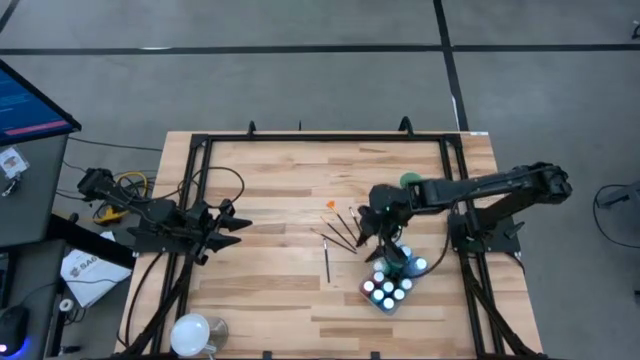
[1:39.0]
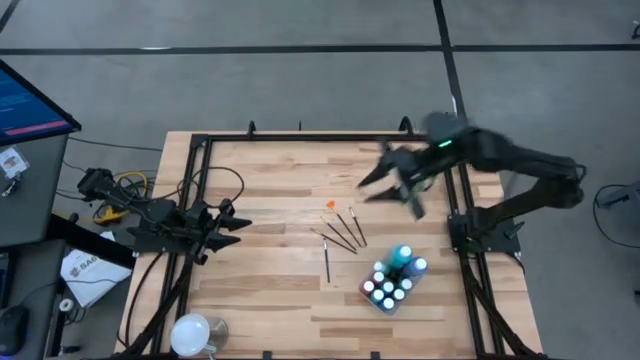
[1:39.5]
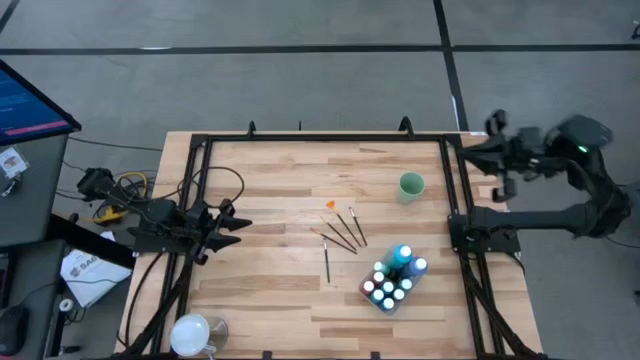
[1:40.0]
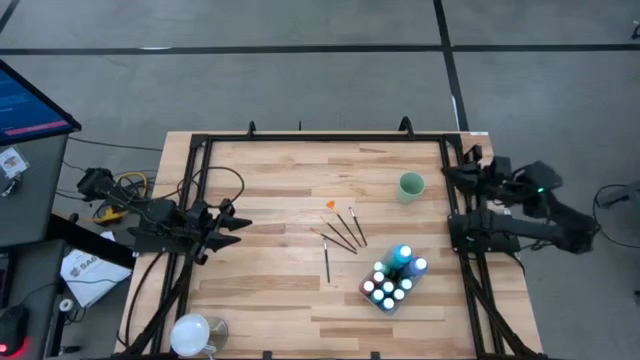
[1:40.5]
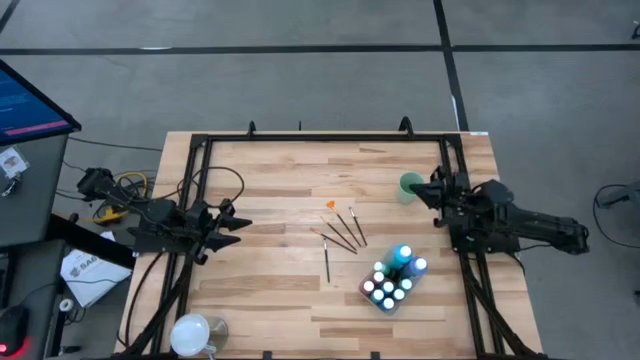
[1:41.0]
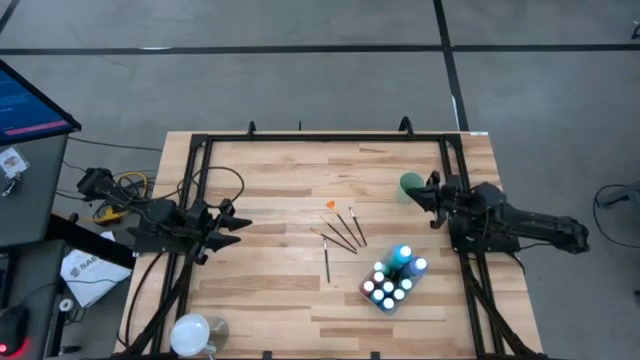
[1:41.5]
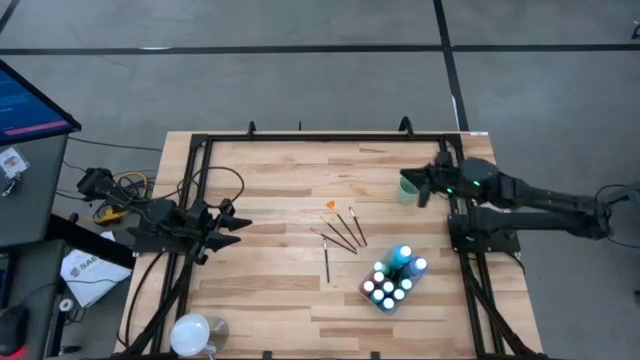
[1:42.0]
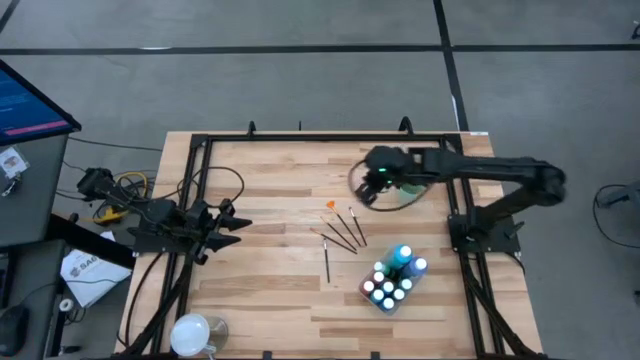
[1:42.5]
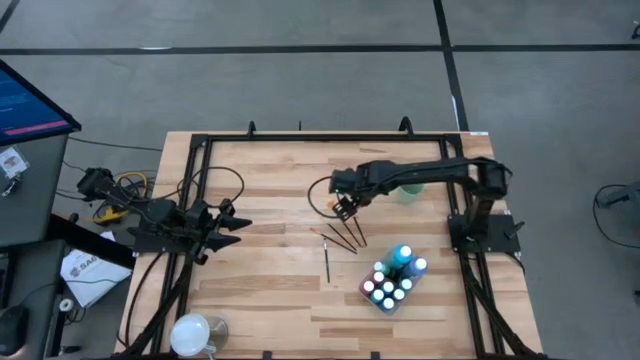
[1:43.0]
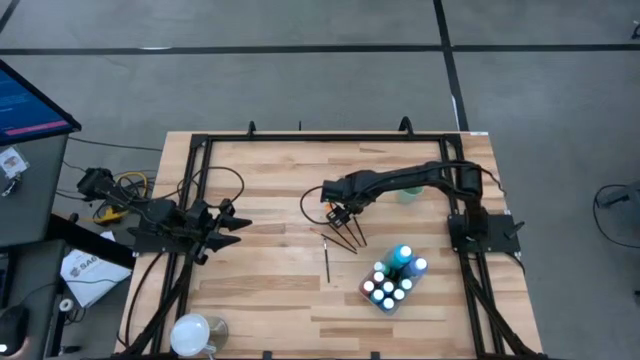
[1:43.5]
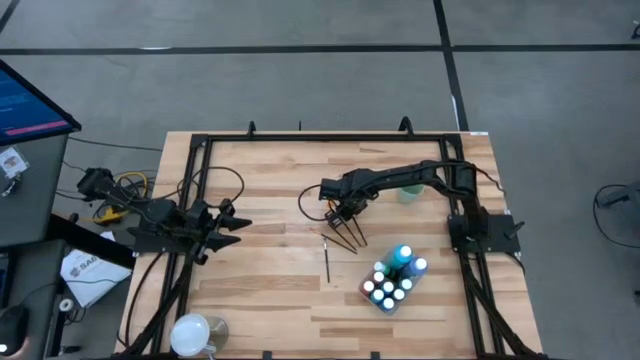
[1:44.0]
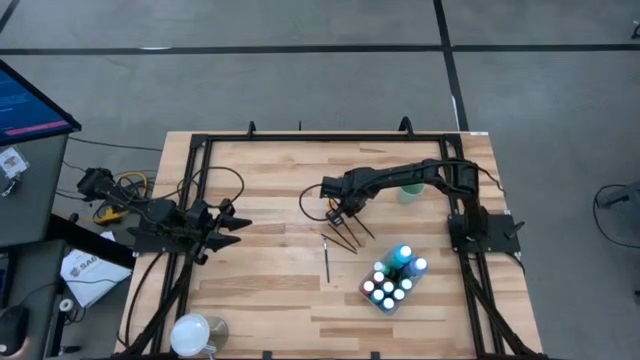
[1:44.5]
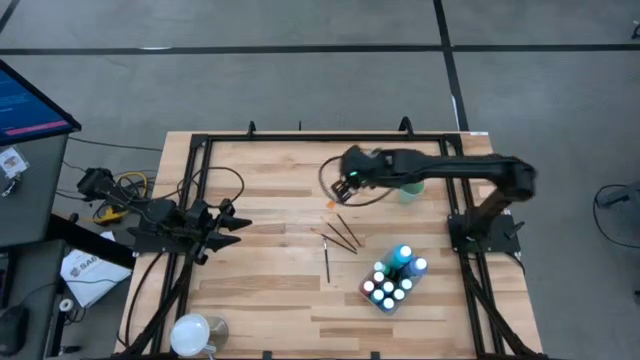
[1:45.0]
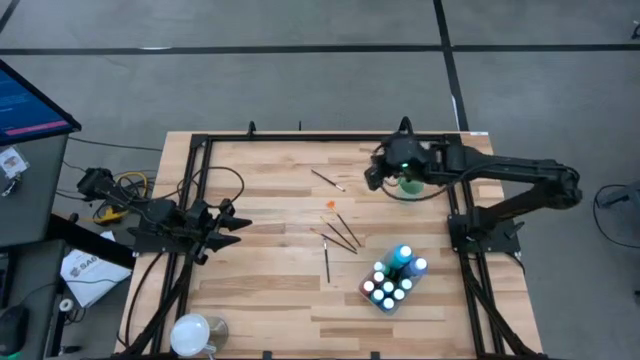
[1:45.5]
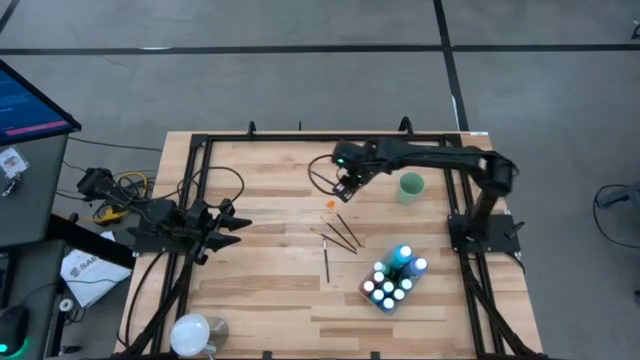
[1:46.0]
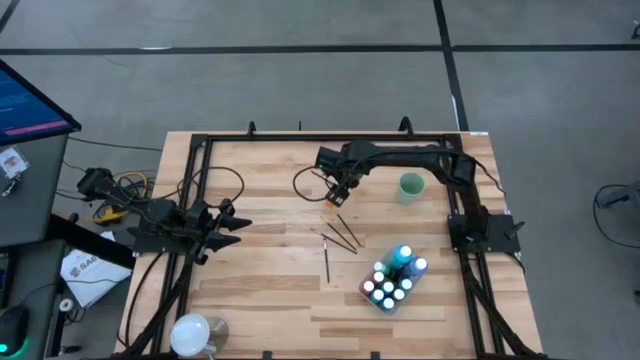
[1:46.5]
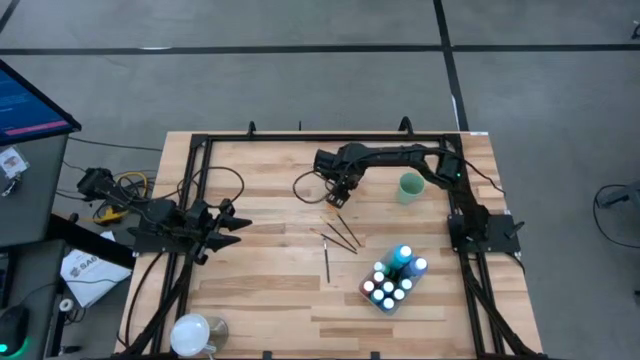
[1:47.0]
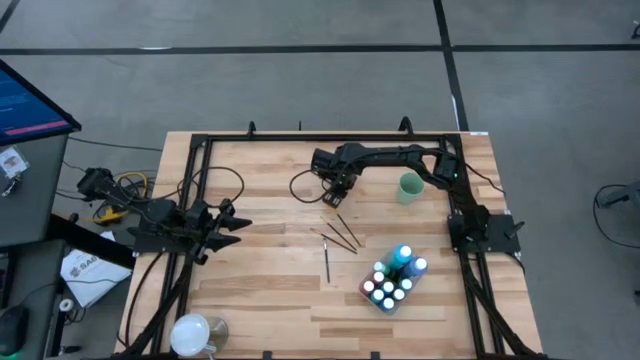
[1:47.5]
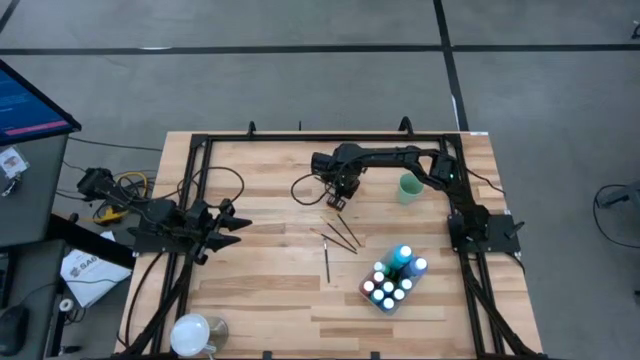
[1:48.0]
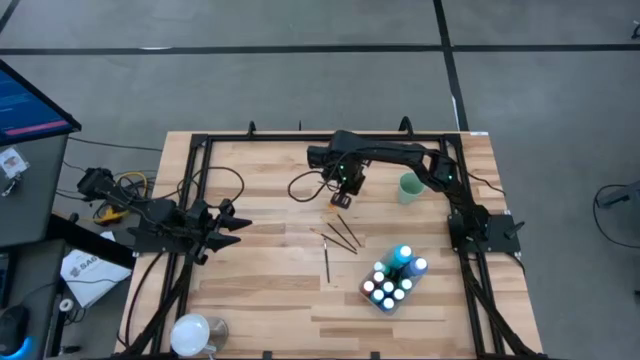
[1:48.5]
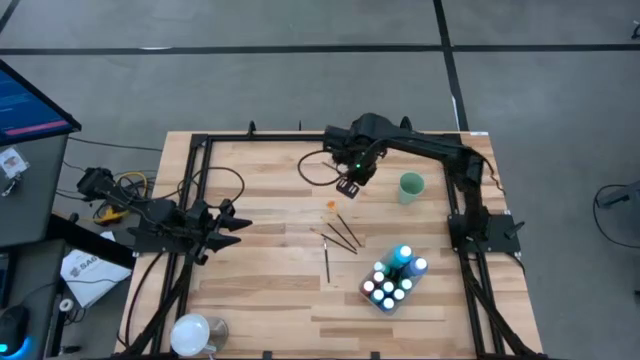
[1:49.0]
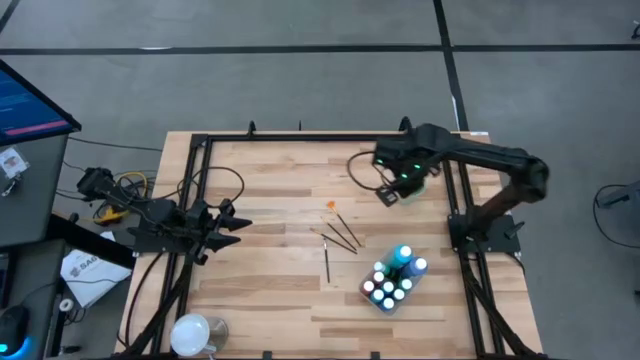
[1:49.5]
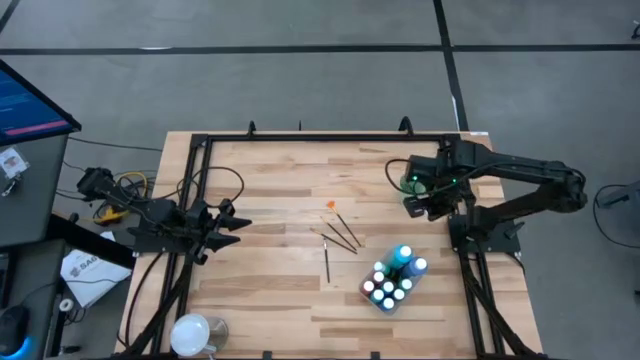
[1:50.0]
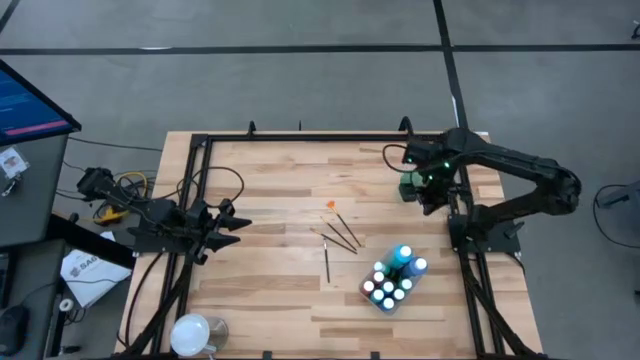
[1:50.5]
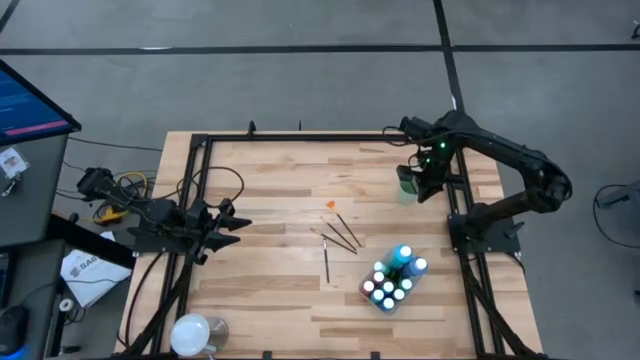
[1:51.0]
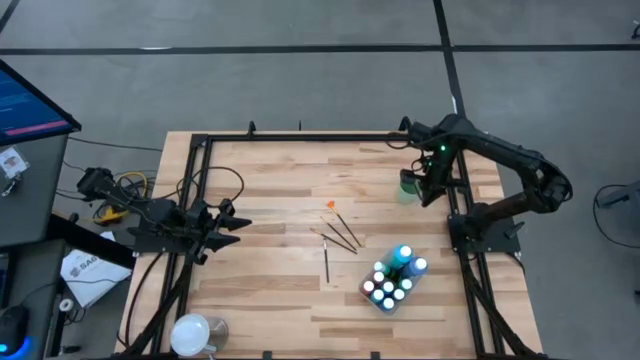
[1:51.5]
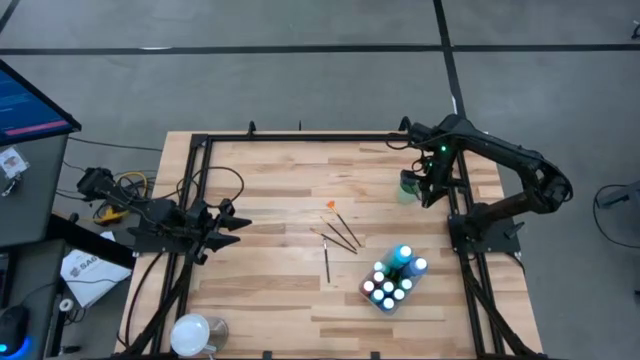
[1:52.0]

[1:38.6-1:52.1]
Task: Pick & Place Paint Supplies
Put the black paint brush into the green cup

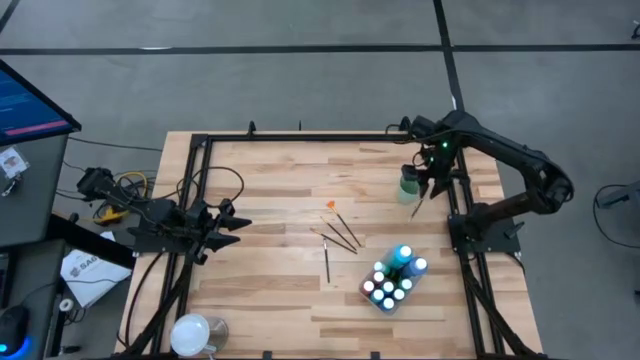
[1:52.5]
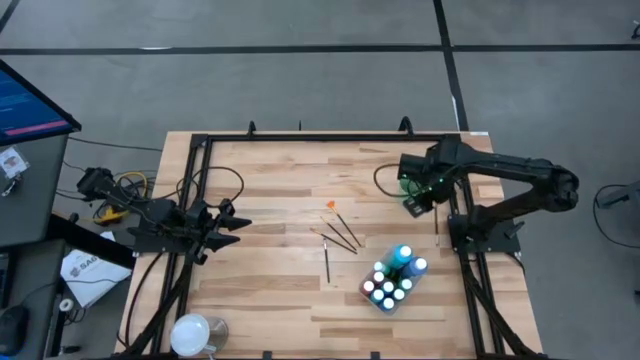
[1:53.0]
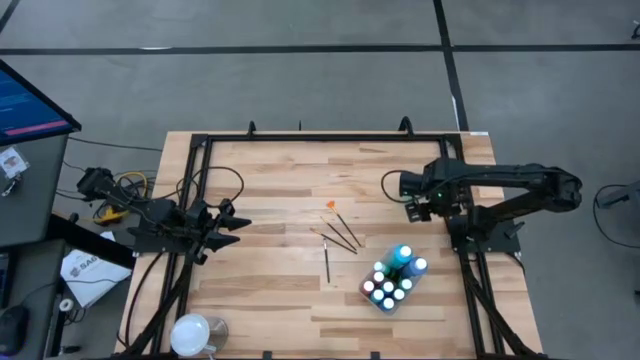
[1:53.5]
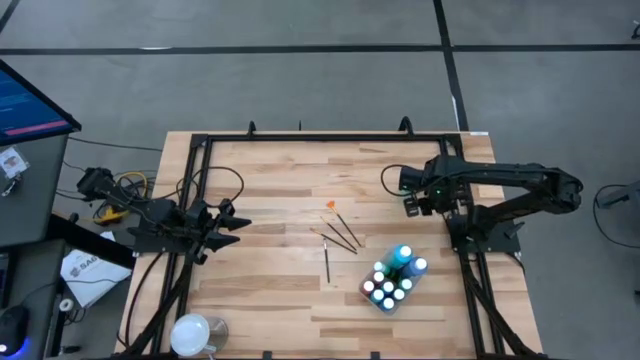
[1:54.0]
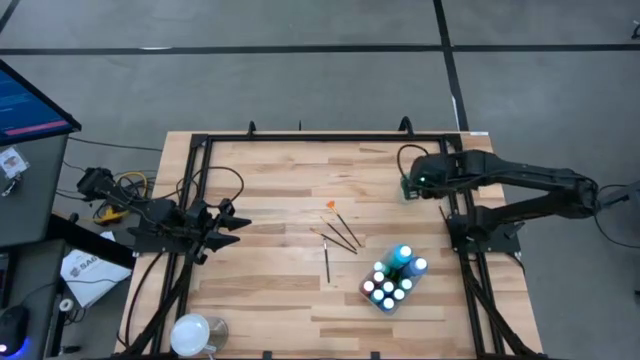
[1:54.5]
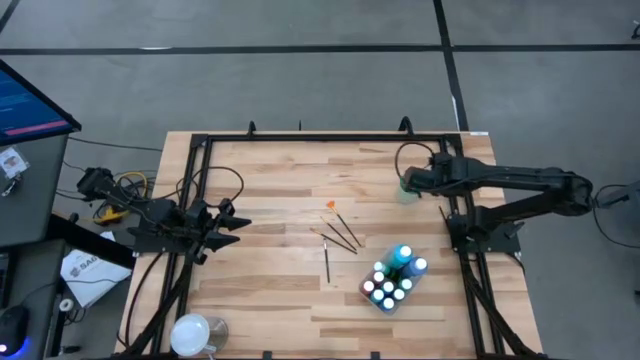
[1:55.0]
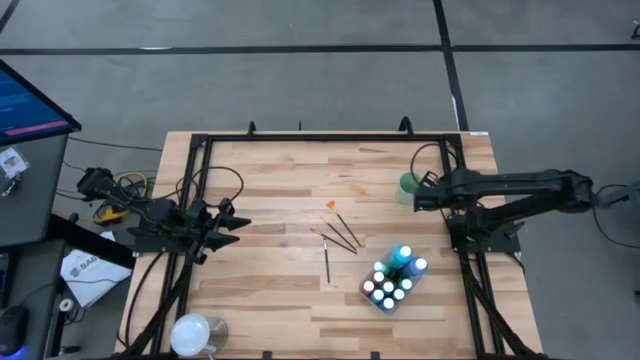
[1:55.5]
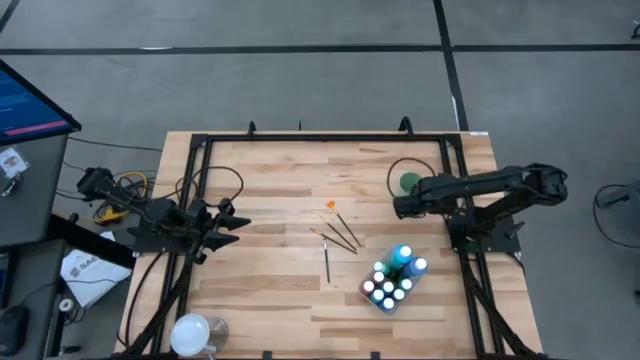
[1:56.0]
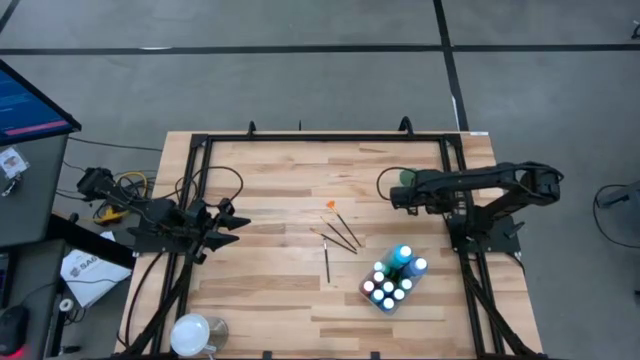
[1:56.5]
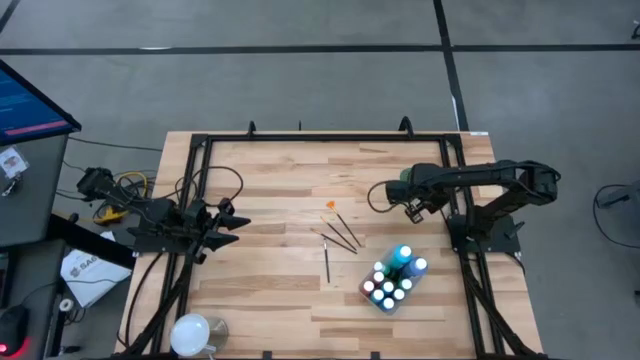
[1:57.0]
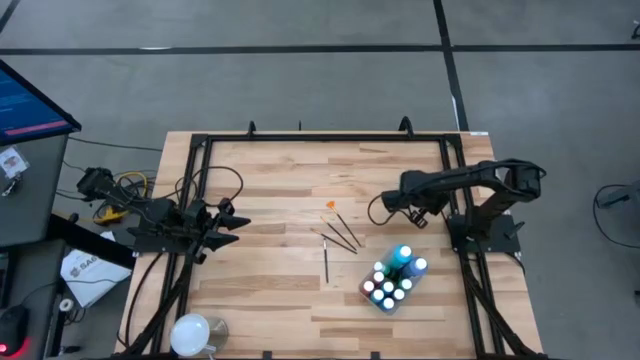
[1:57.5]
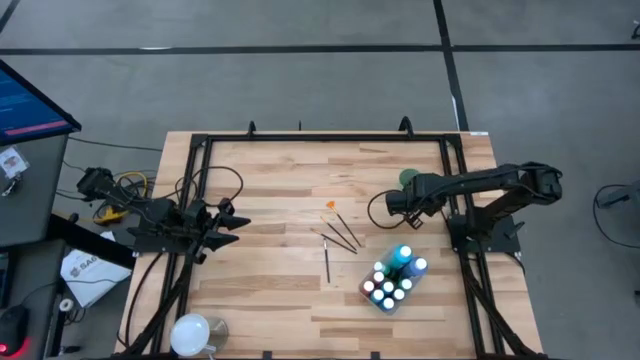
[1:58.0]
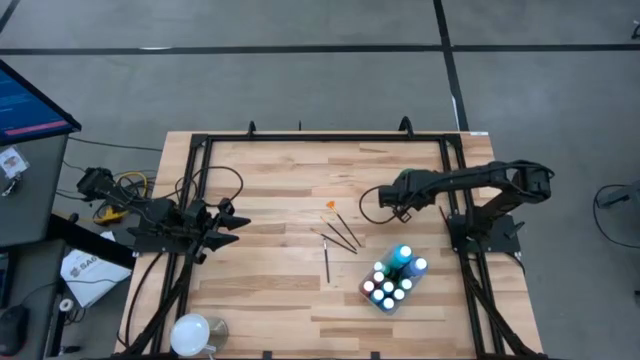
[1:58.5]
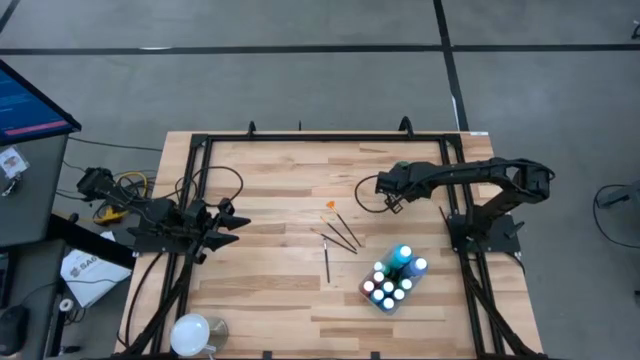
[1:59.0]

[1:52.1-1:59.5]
Put the black paint brush into the green cup
